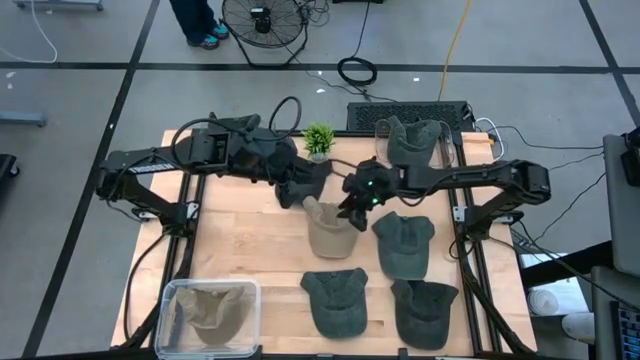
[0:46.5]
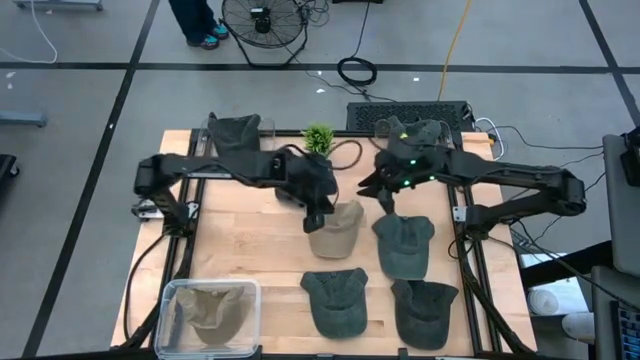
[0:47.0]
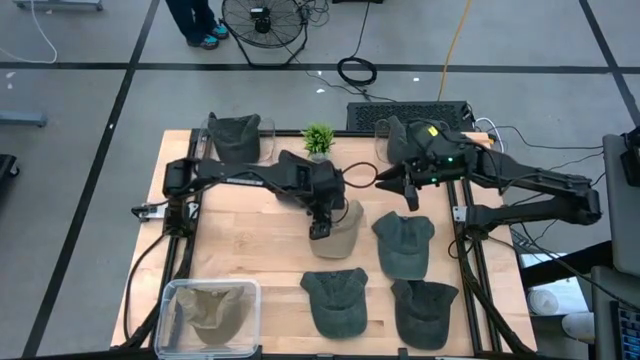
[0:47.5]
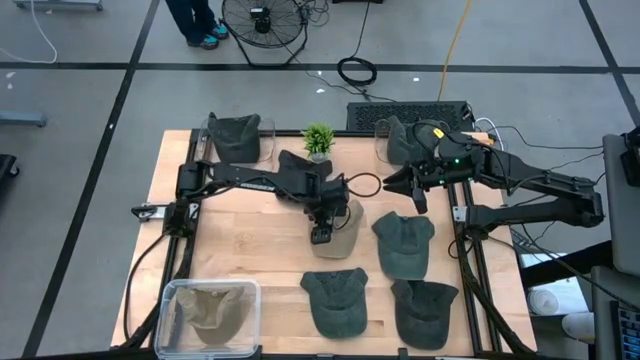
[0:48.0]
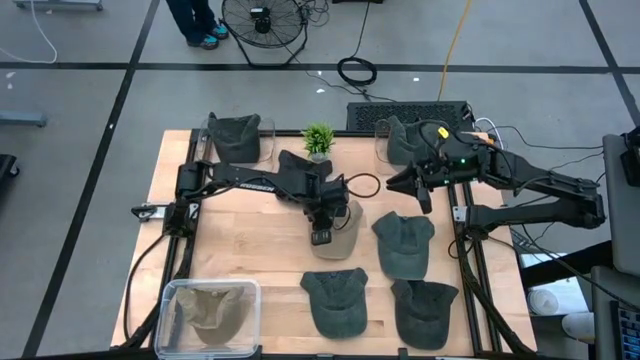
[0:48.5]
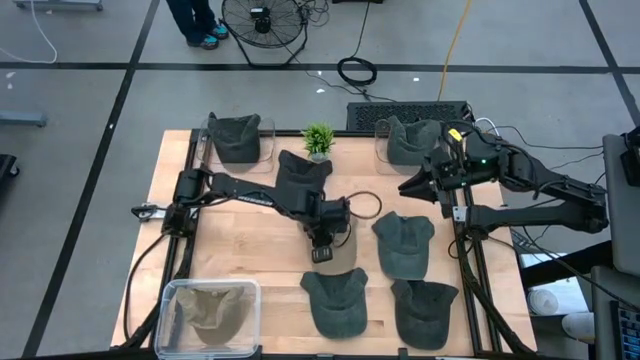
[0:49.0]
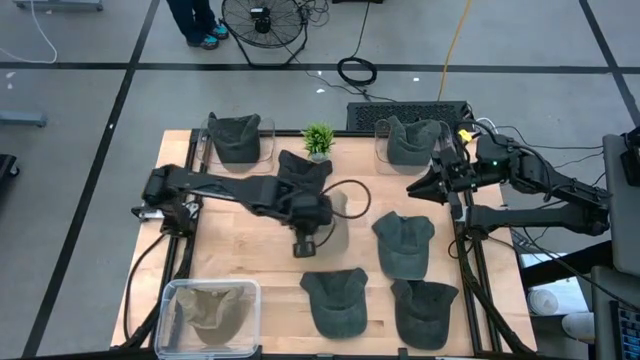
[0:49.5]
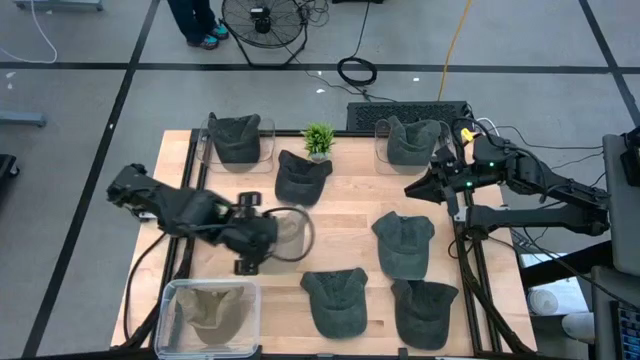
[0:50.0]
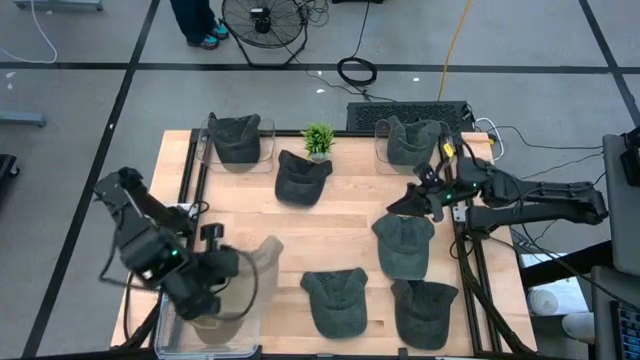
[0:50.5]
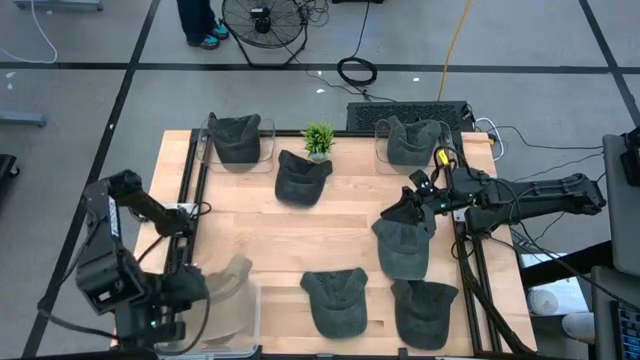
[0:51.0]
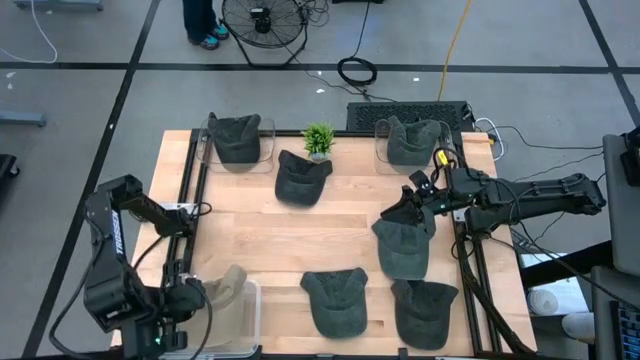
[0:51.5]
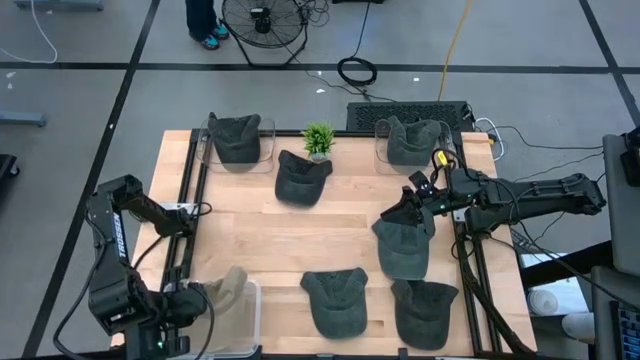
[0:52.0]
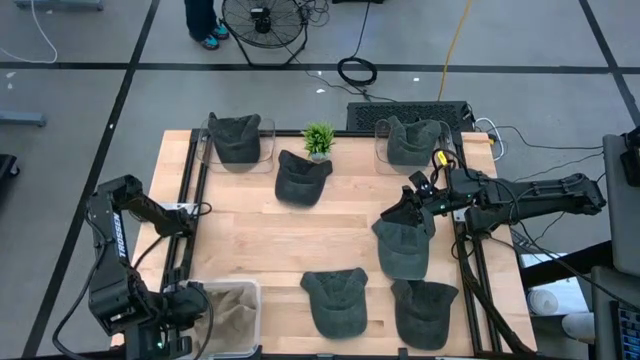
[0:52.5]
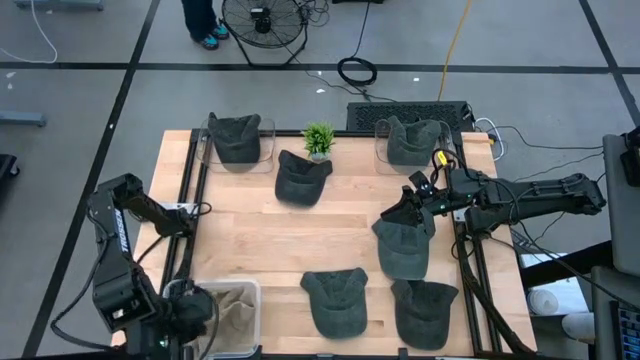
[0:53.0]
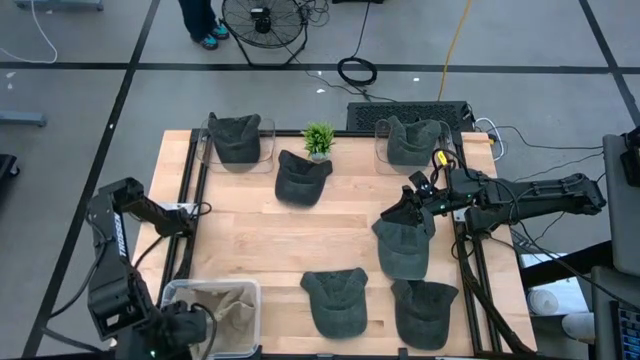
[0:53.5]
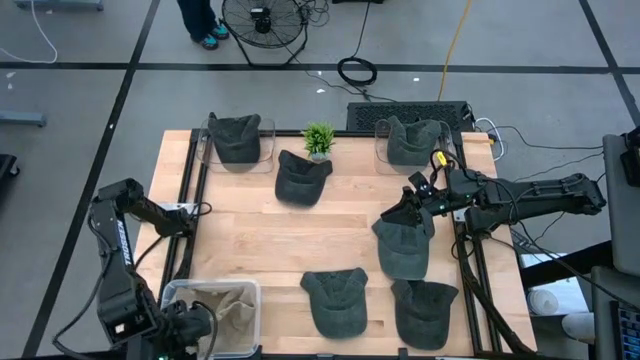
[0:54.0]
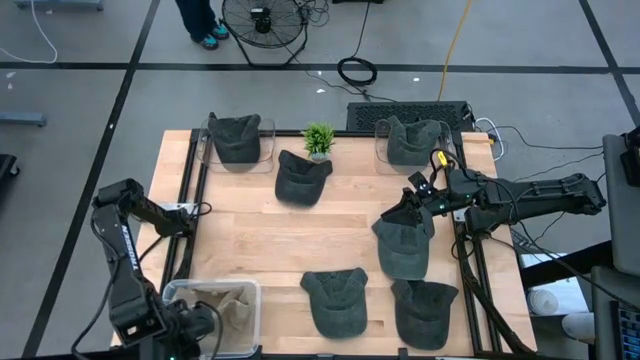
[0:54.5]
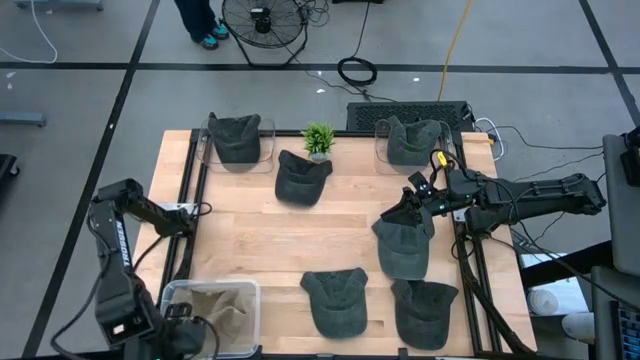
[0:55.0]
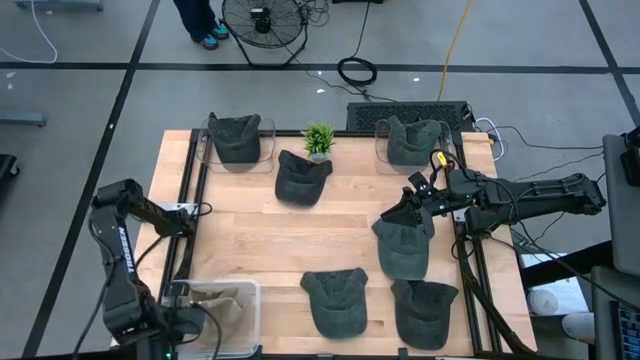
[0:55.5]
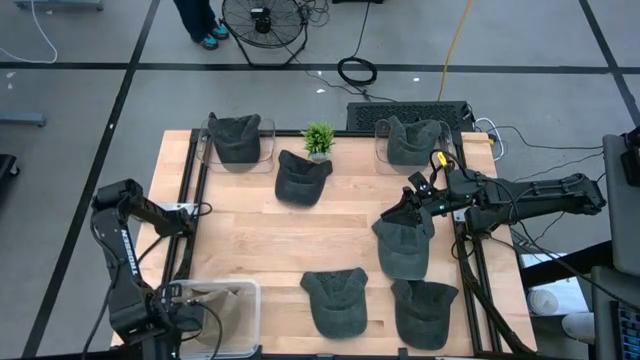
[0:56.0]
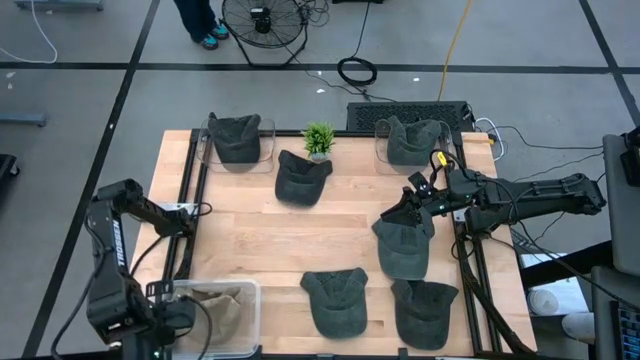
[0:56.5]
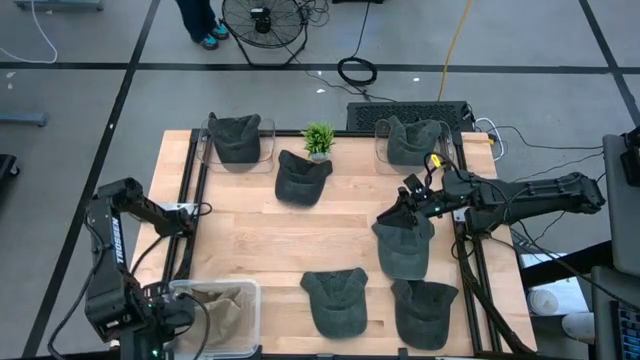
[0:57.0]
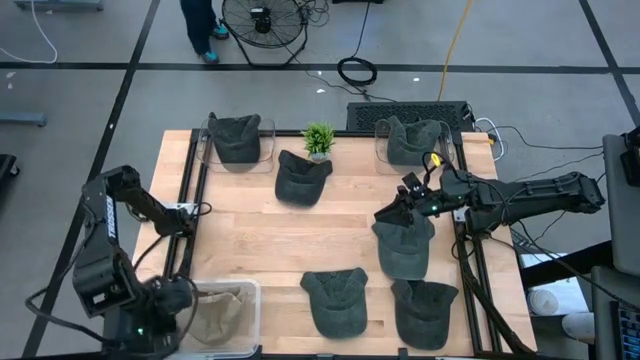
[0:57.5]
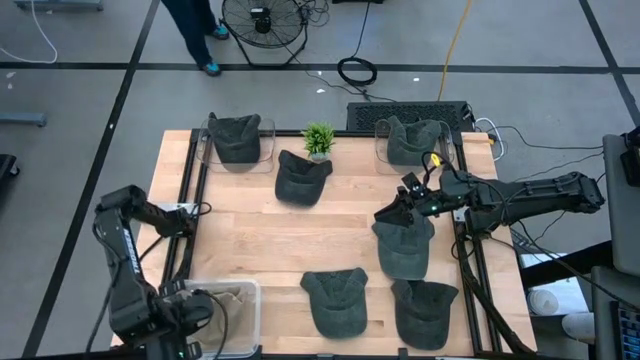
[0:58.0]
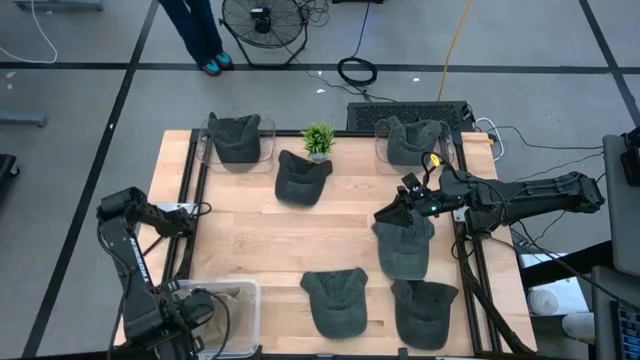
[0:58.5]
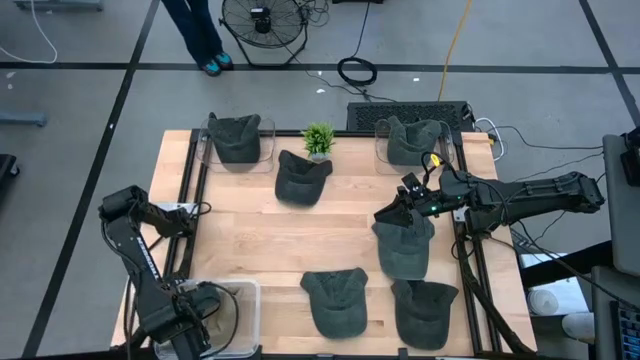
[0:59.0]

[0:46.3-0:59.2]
Task: Pick & Place hat
Put the brown cap into the bottom transparent container

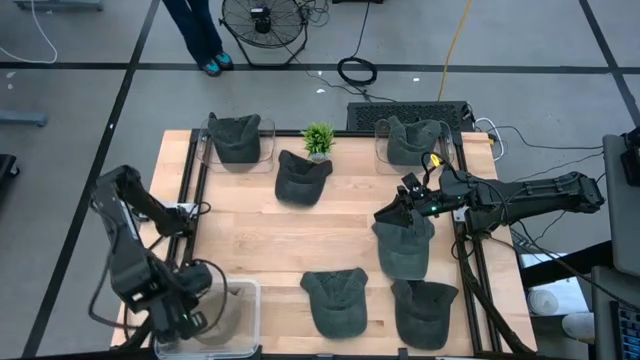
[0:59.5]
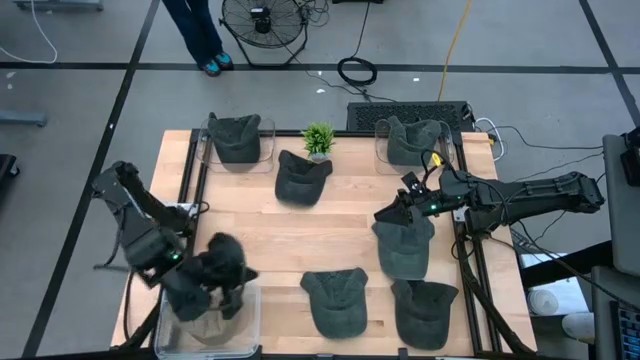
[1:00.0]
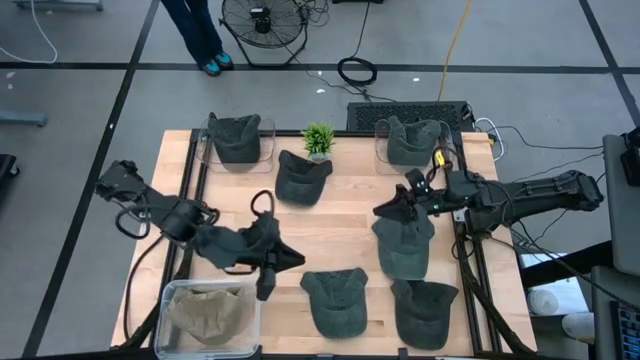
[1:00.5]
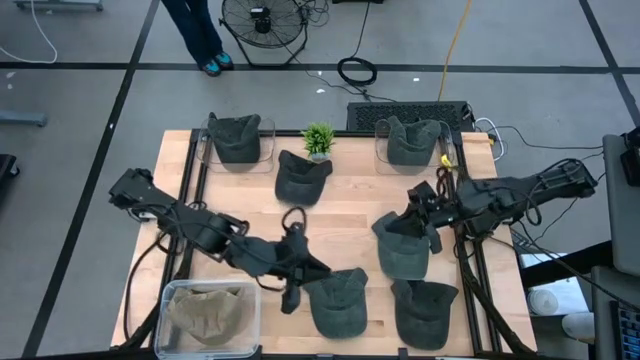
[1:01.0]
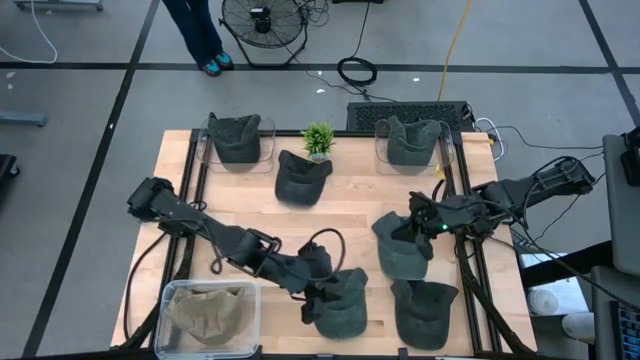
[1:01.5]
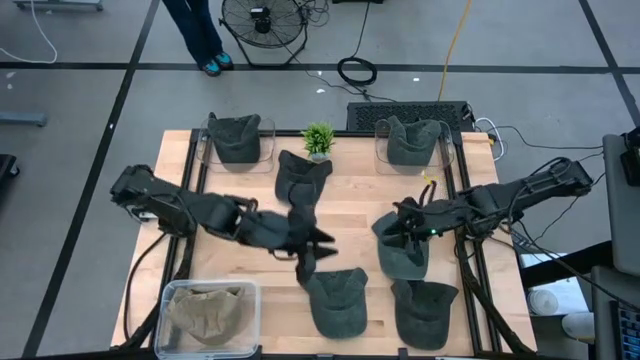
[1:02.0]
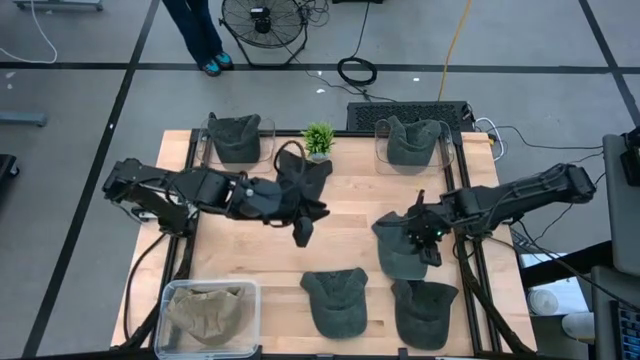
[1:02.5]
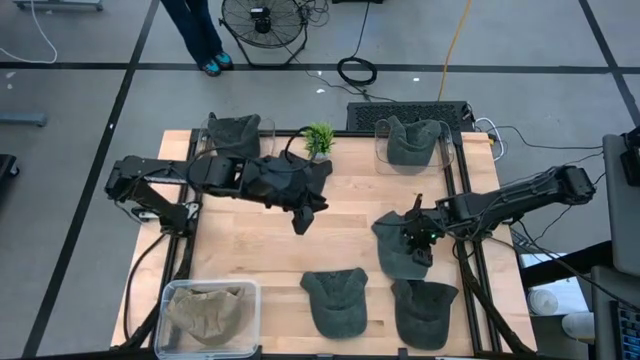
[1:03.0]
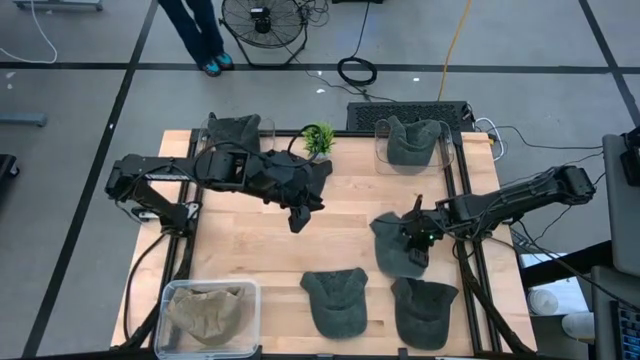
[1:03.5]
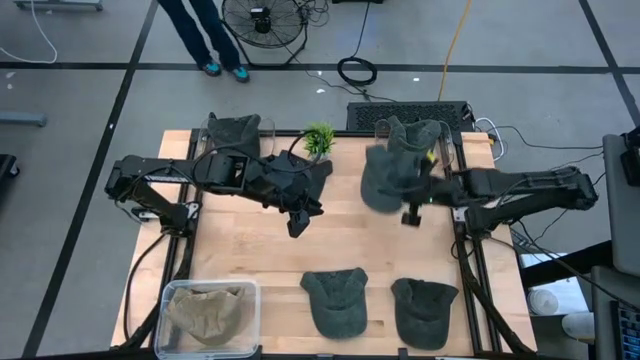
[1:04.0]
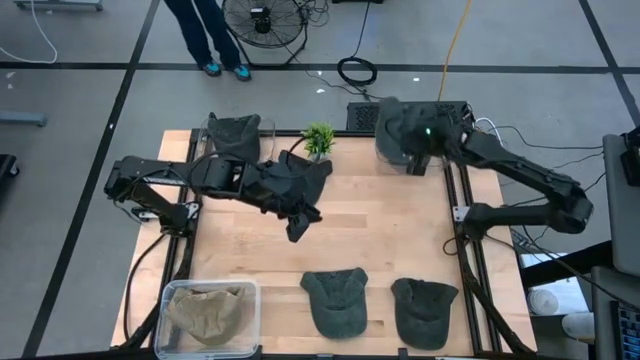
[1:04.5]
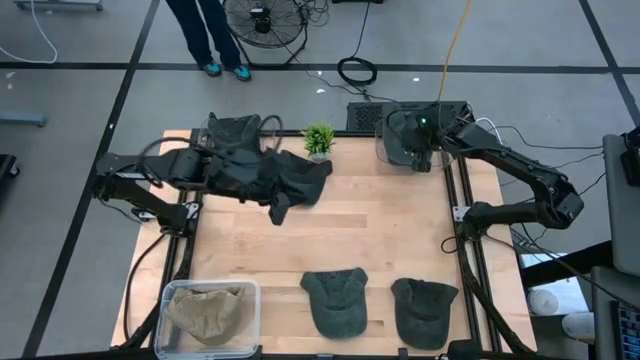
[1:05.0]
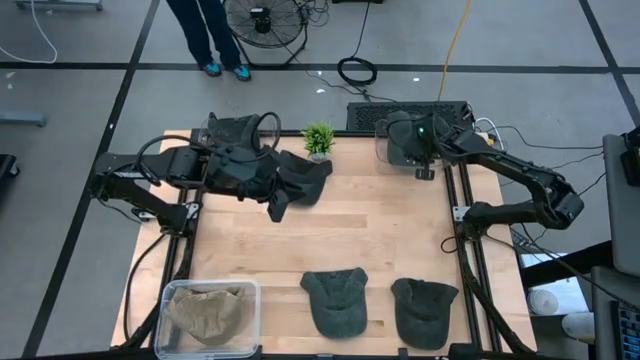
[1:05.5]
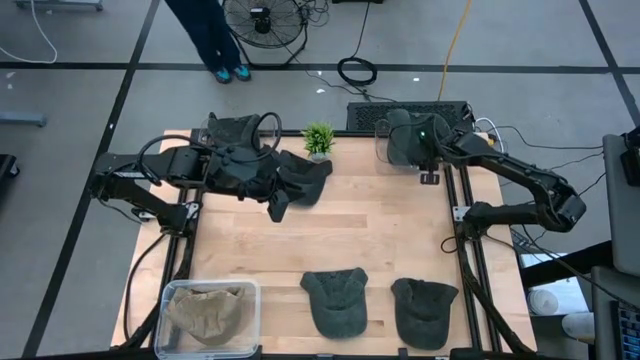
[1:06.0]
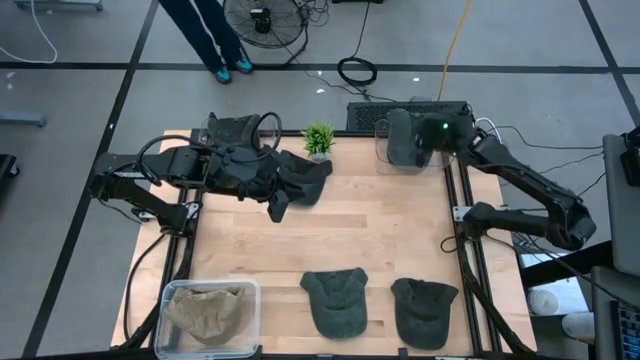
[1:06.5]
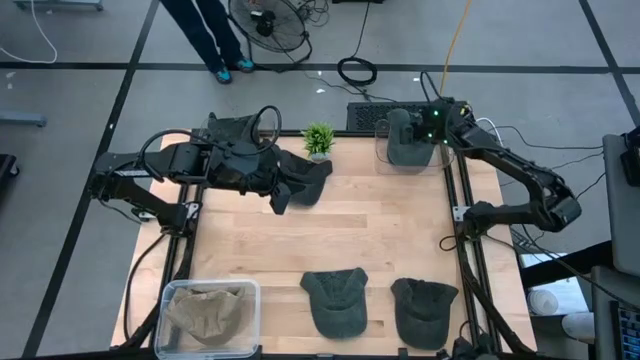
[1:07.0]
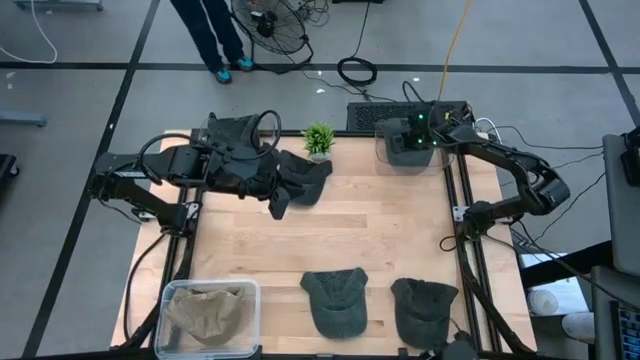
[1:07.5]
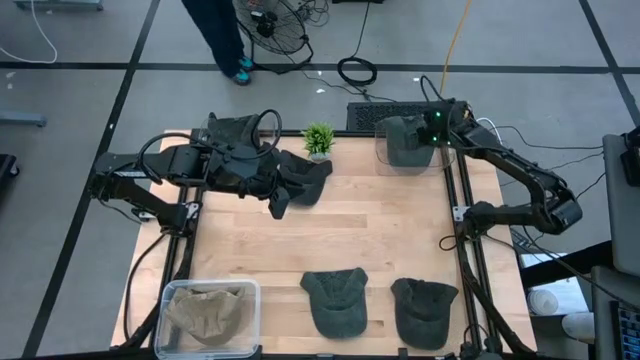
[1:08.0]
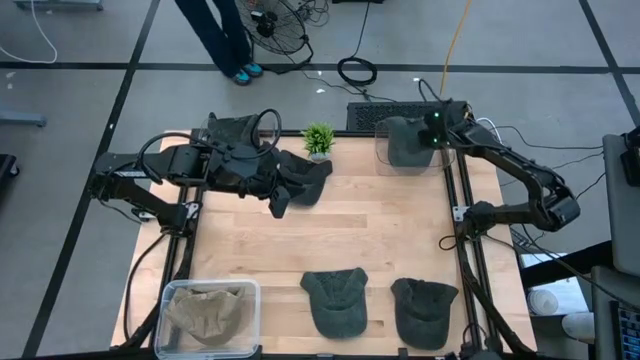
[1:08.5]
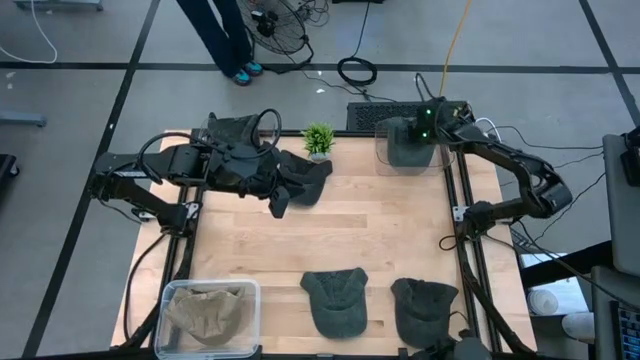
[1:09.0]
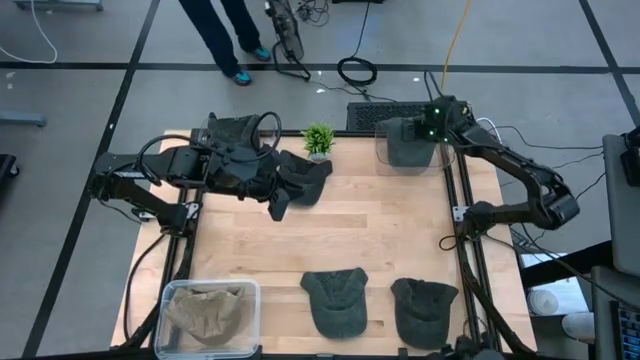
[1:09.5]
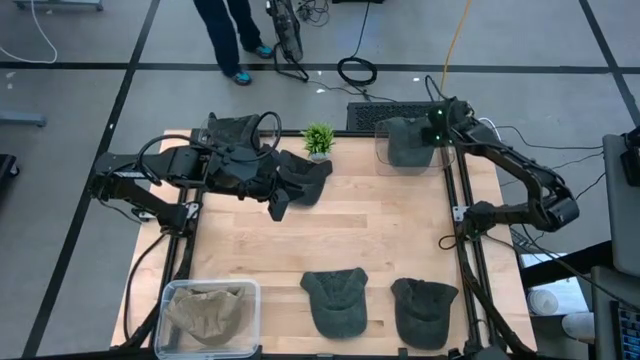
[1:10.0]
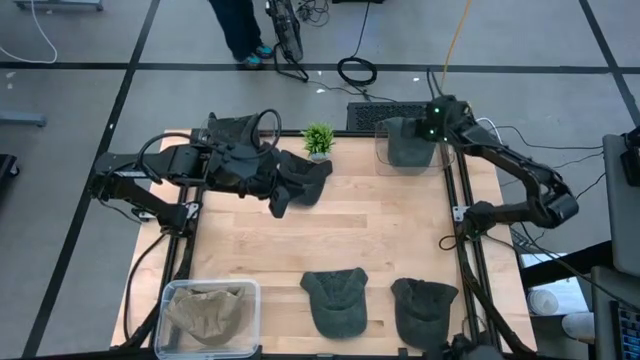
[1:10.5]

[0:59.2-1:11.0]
Put the top green cap into the right transparent bin
